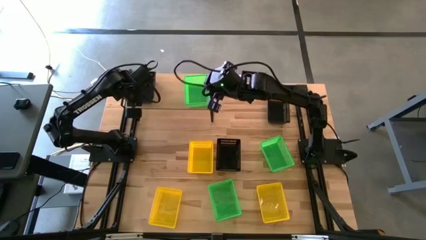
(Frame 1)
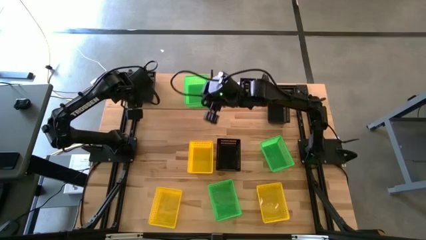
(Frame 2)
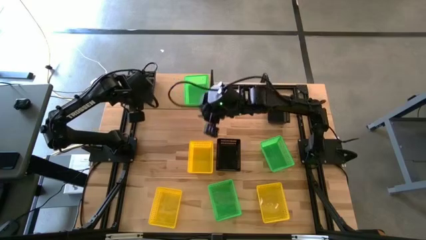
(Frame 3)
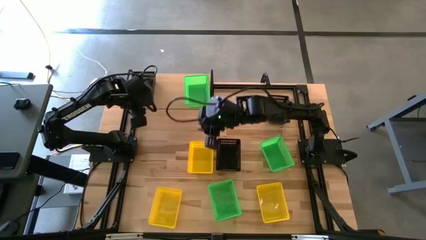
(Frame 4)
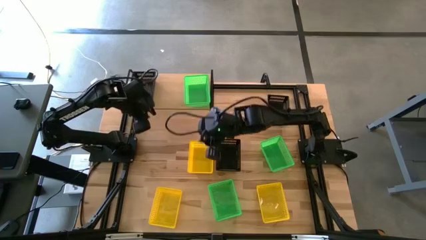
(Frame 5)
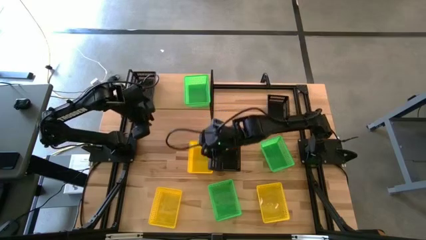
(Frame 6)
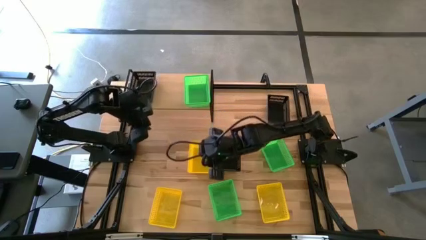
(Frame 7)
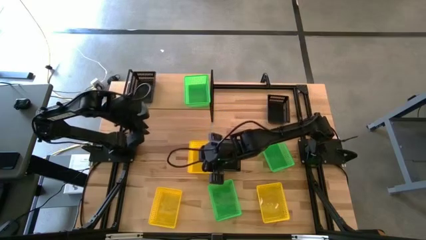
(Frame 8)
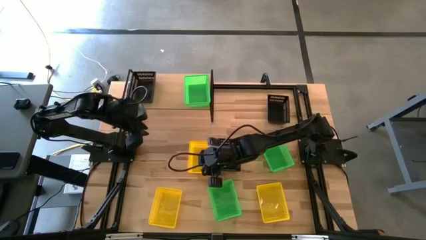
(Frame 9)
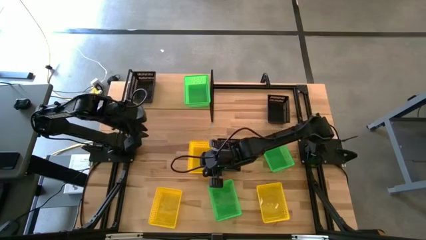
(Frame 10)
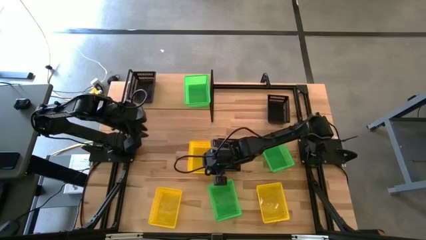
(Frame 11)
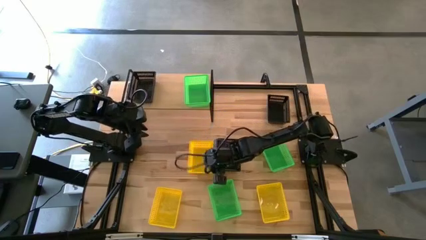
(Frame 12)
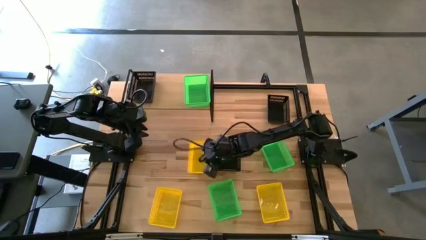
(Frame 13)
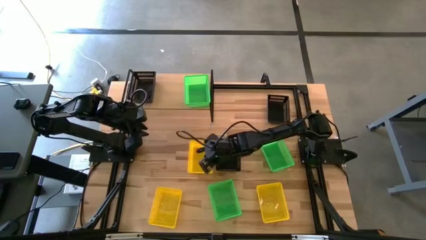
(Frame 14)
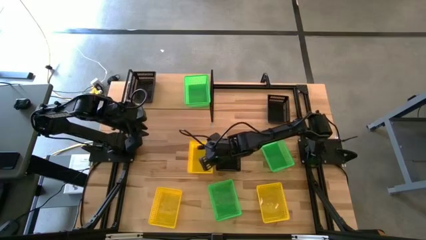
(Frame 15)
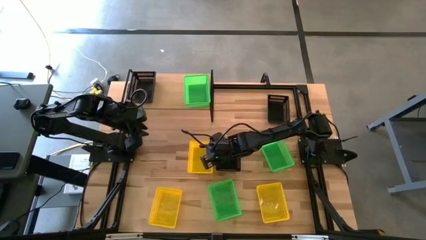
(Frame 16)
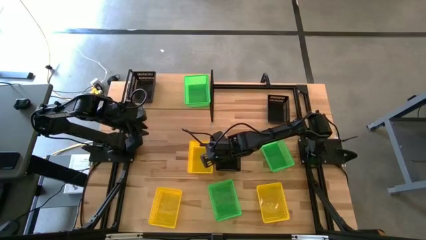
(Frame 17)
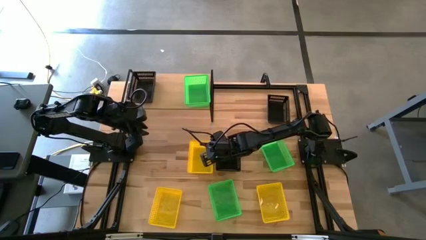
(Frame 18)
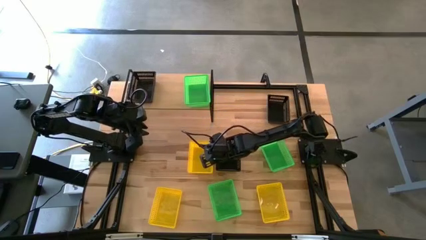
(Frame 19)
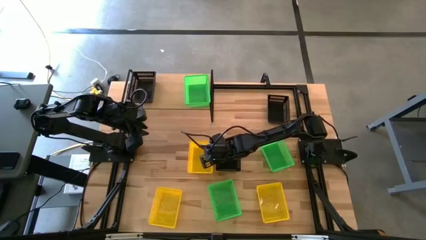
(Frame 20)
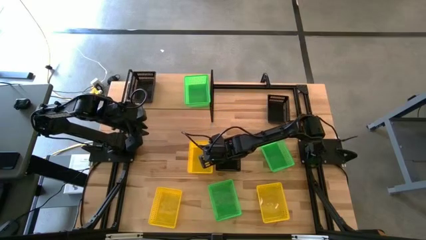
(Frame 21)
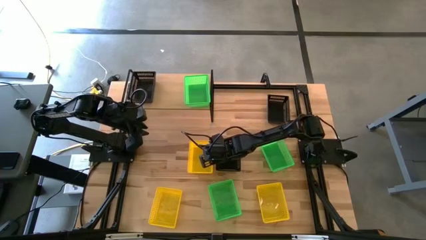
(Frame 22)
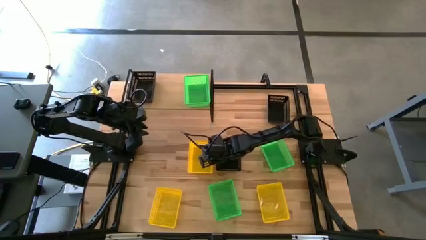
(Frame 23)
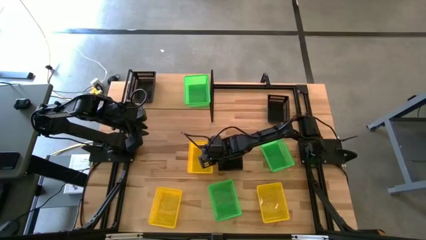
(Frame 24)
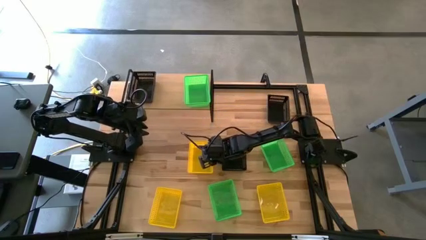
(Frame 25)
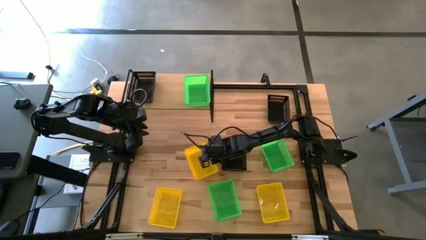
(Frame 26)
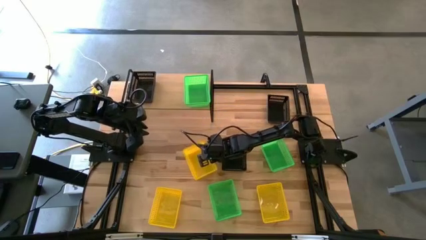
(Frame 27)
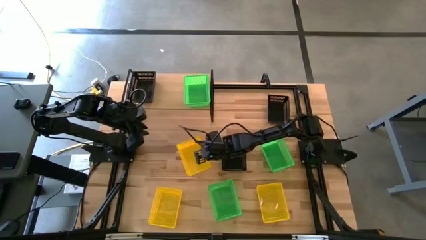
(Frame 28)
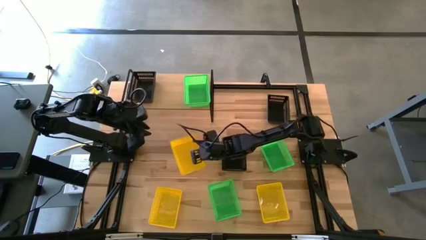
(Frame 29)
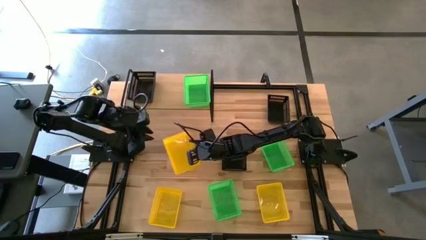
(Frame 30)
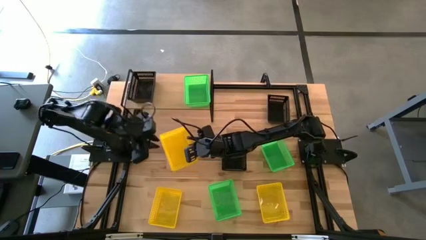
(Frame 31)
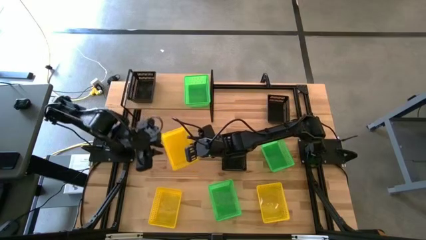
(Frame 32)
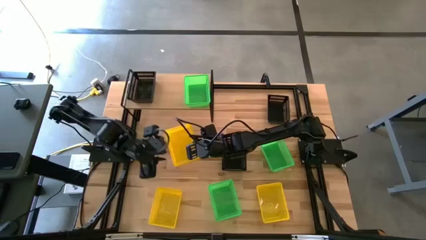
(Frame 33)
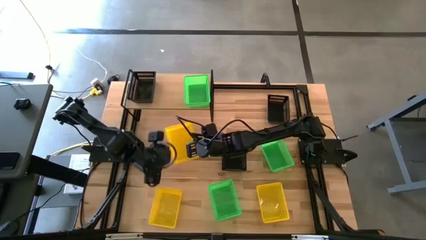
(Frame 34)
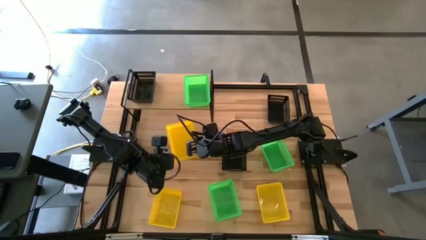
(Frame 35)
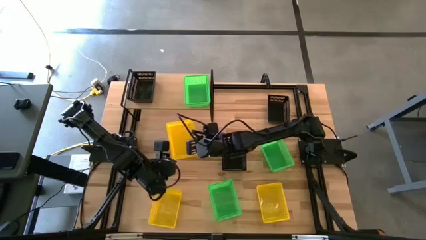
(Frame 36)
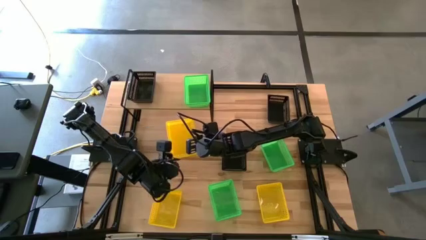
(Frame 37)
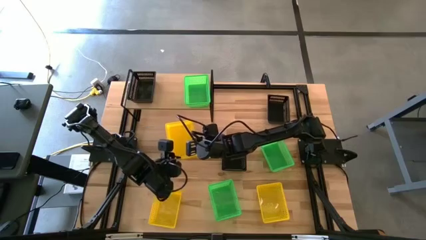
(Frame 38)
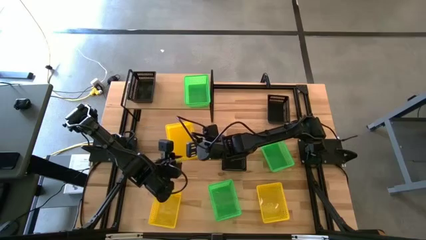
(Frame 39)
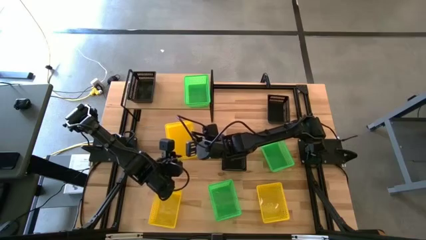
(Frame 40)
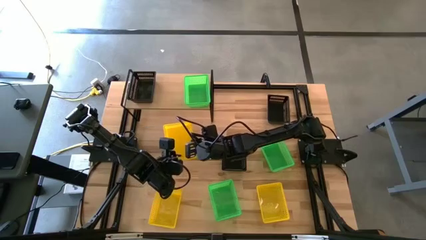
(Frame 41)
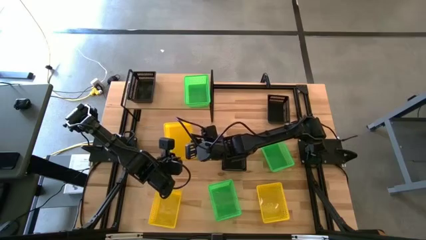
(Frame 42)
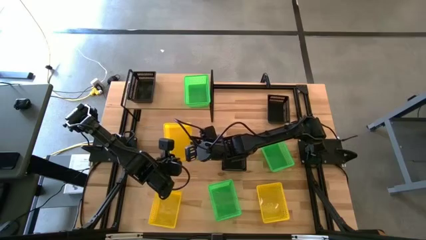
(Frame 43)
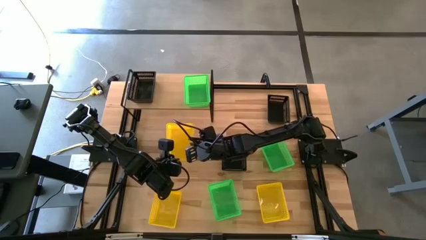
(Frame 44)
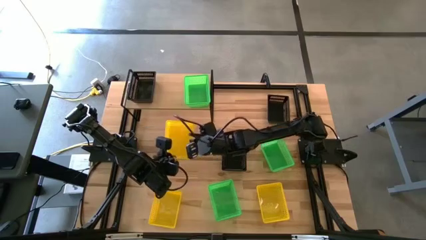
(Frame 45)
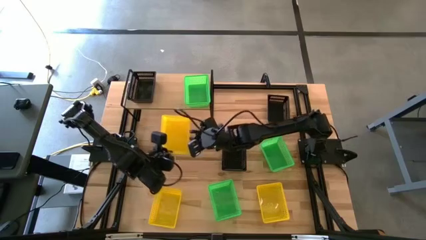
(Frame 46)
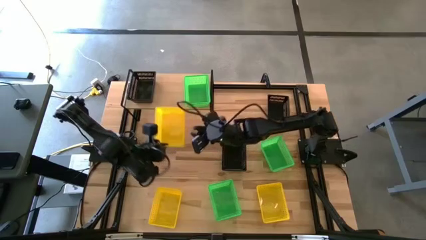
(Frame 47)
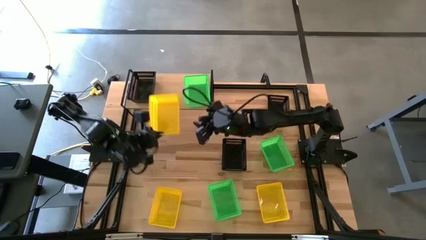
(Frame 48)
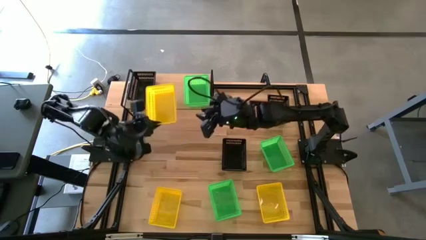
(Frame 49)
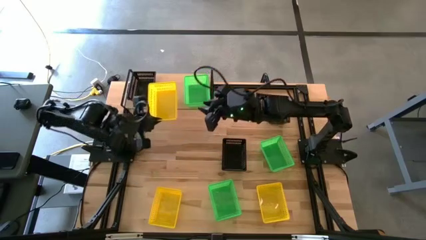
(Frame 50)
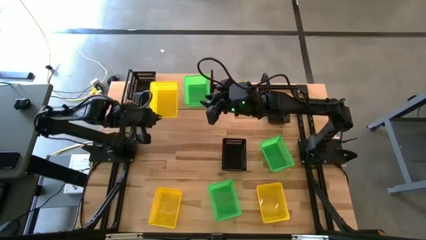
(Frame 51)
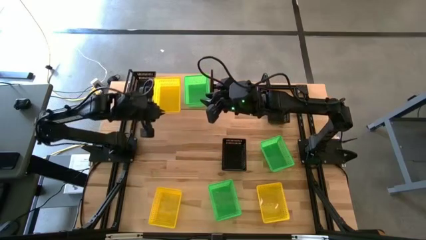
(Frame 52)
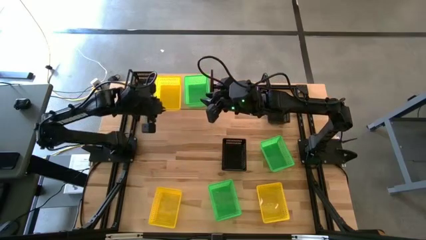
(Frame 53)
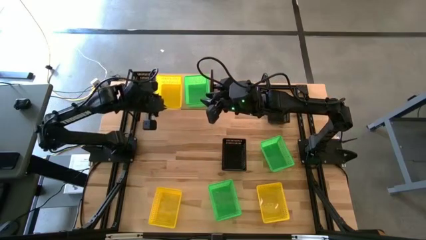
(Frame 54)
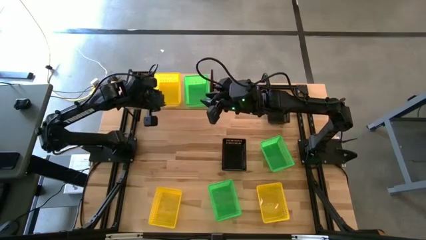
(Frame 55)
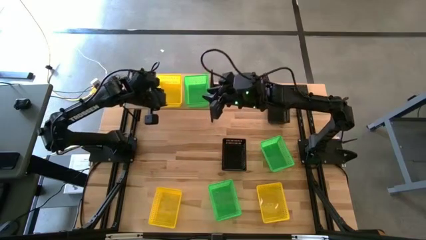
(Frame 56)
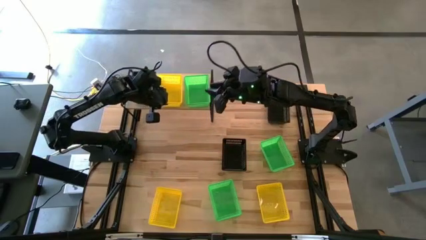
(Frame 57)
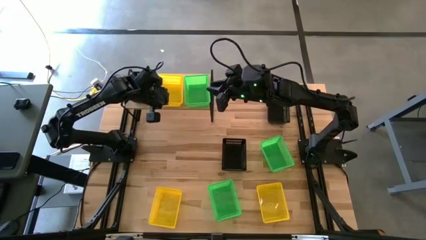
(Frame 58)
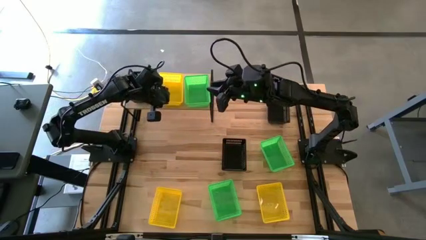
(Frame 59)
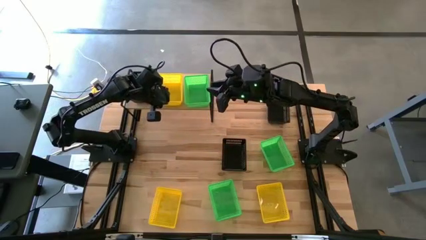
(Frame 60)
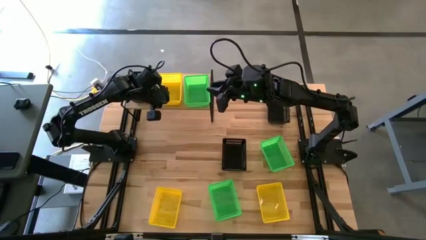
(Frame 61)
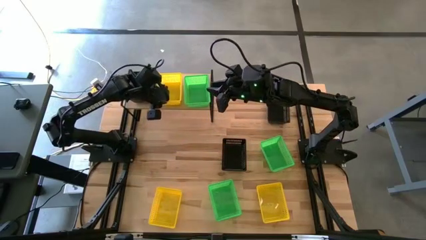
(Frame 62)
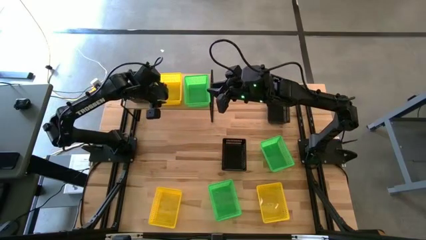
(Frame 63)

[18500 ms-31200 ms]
Task: Stack baskets on shelf by color
Put the top yellow basket on the shelf

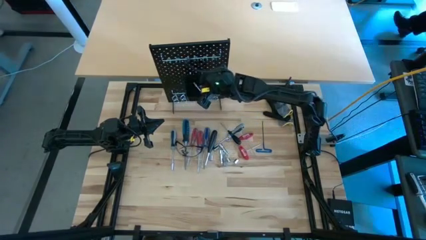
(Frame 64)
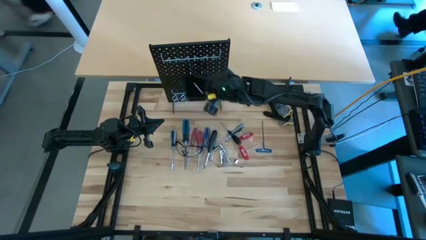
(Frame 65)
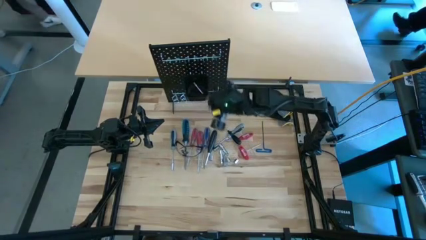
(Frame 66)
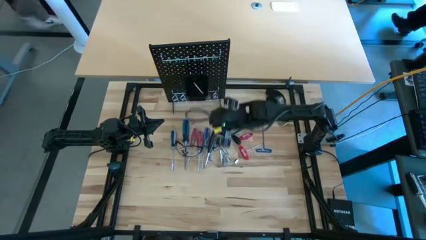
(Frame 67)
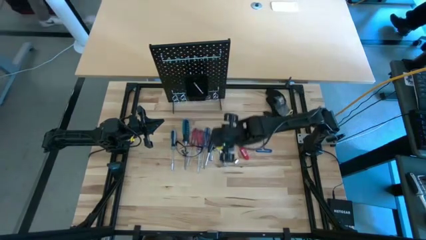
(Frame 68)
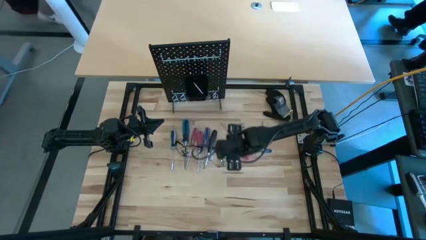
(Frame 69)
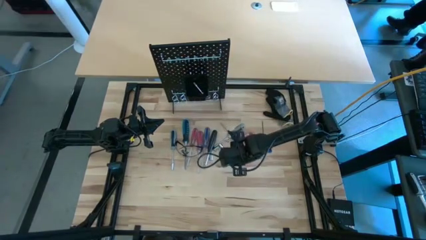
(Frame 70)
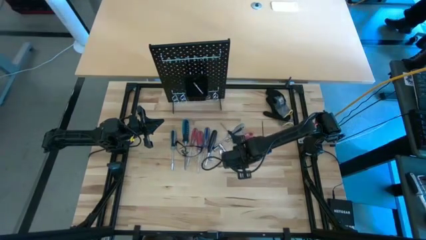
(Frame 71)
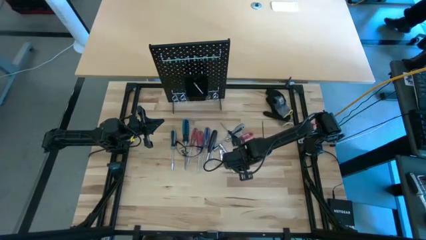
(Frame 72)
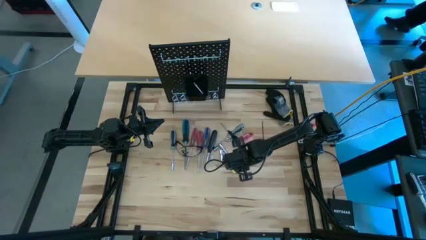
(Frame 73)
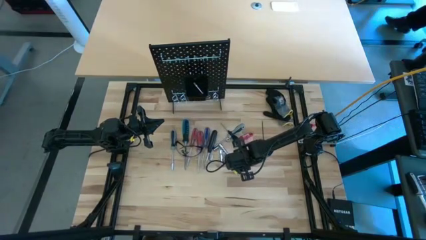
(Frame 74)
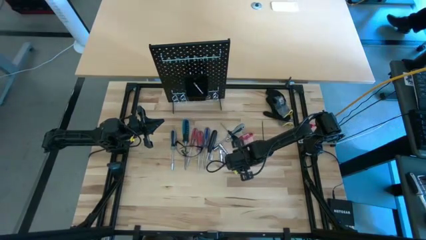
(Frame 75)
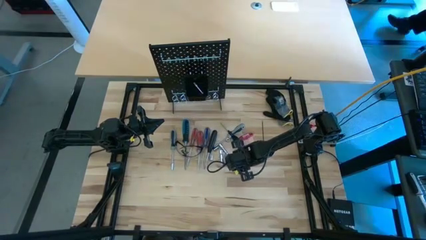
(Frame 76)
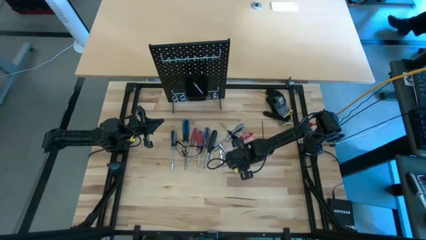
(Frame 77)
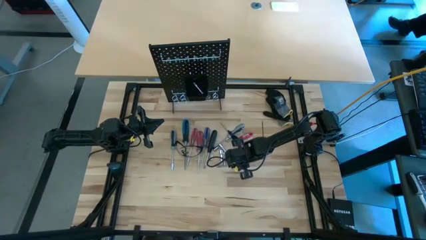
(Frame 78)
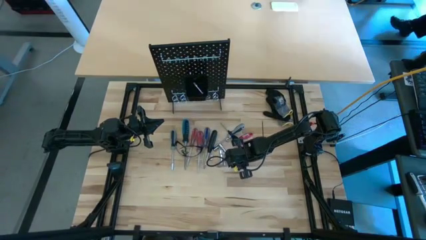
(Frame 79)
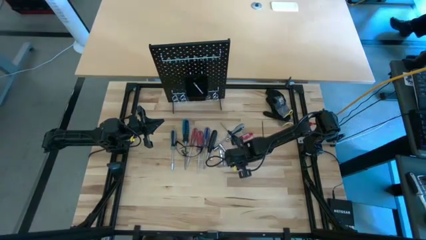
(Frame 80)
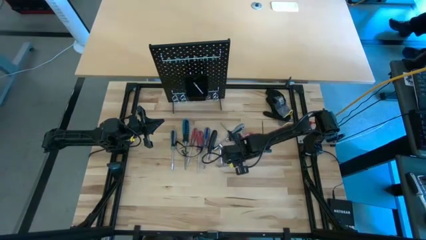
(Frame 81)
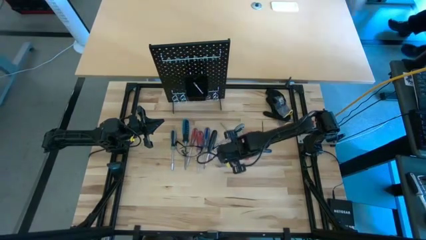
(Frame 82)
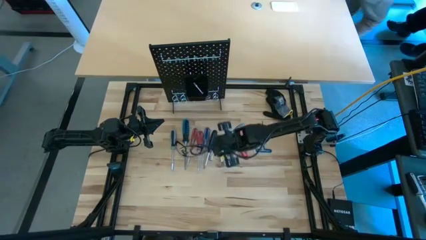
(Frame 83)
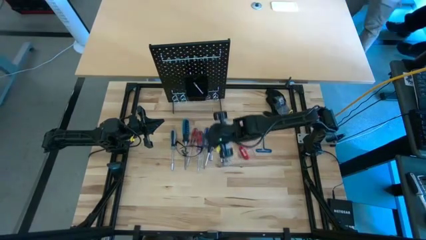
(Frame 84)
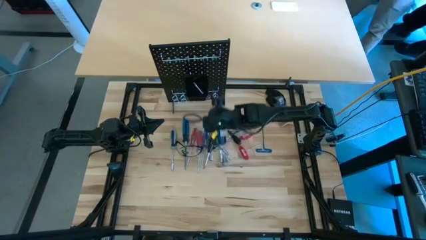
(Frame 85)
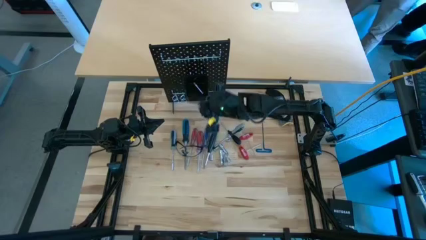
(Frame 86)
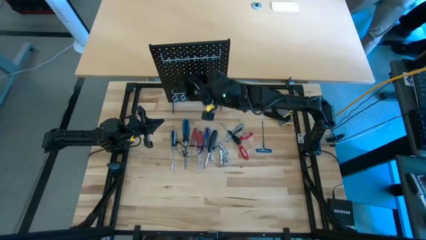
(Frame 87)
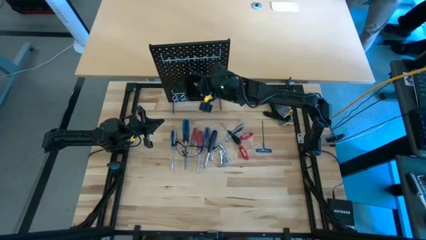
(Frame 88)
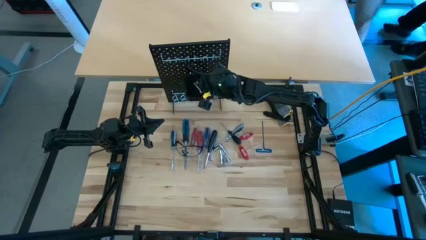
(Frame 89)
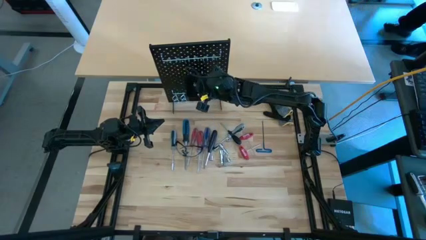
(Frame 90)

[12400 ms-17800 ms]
Task: Hang tools onto peg board
Put the right metal socket into the black bin on the peg board
